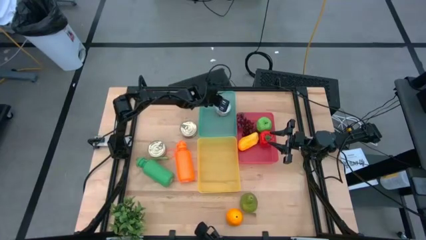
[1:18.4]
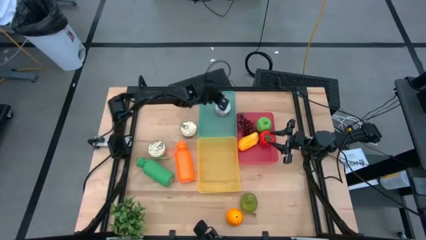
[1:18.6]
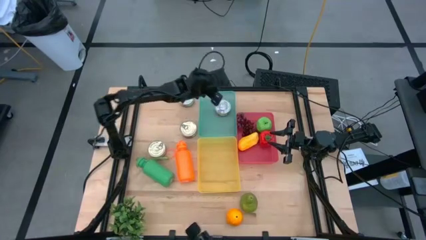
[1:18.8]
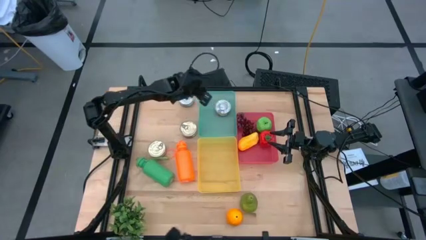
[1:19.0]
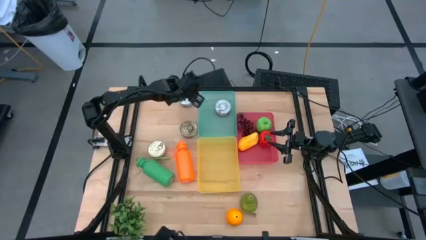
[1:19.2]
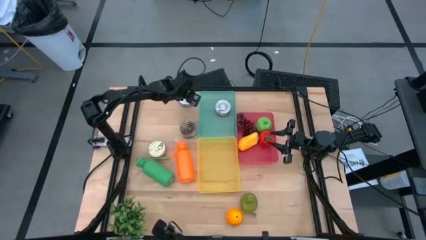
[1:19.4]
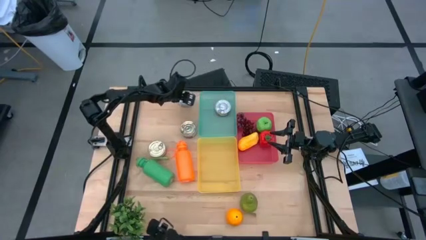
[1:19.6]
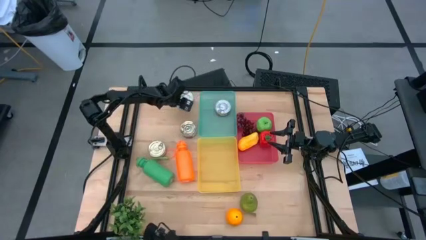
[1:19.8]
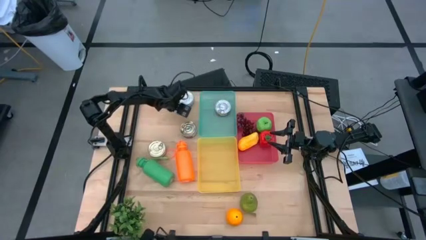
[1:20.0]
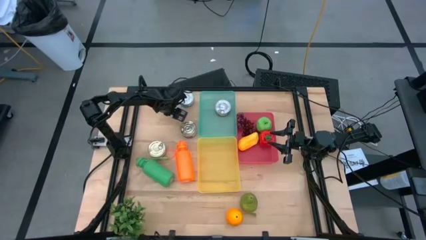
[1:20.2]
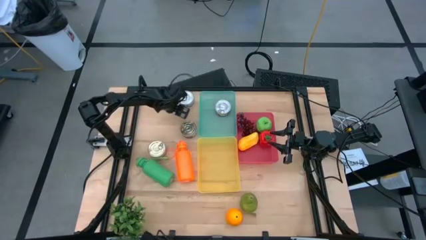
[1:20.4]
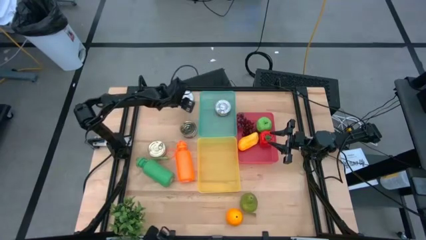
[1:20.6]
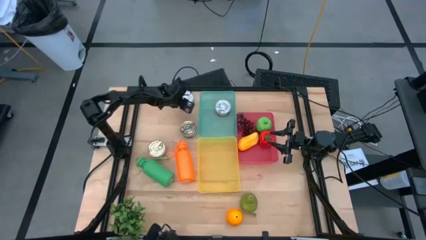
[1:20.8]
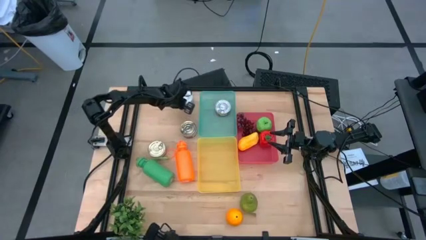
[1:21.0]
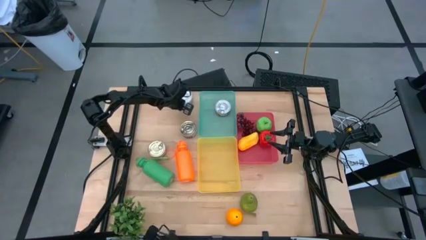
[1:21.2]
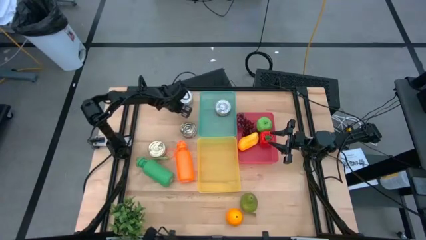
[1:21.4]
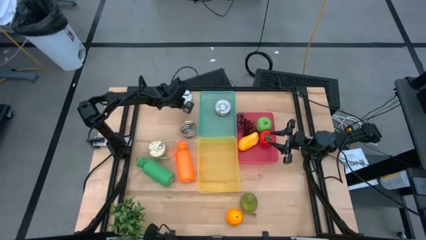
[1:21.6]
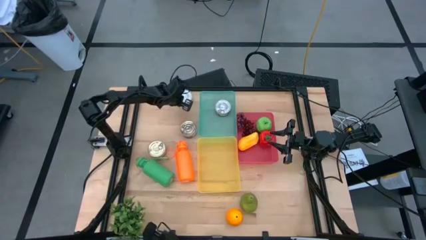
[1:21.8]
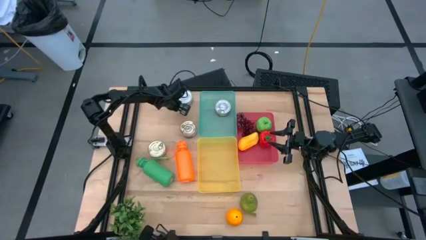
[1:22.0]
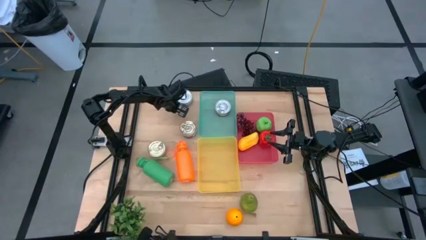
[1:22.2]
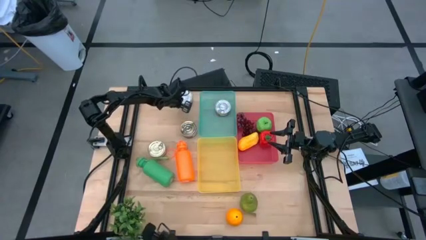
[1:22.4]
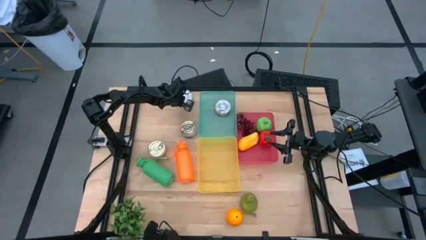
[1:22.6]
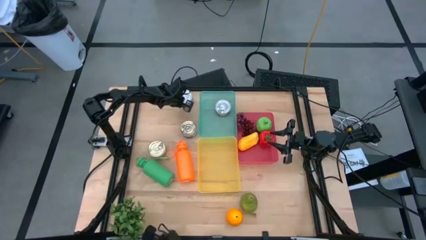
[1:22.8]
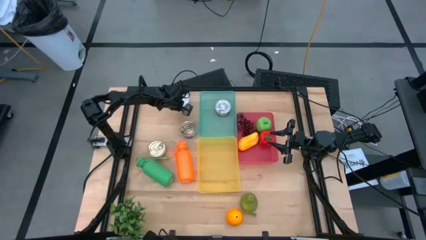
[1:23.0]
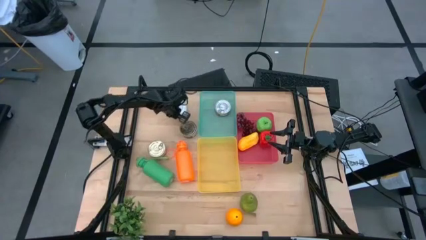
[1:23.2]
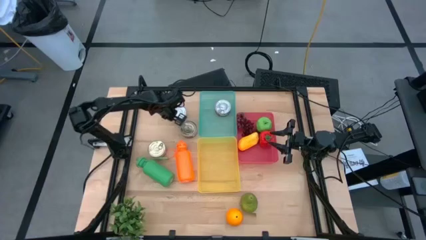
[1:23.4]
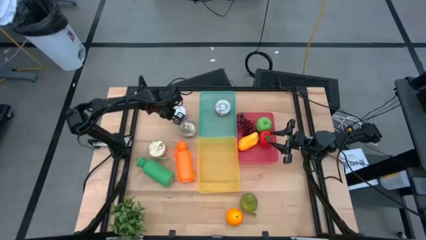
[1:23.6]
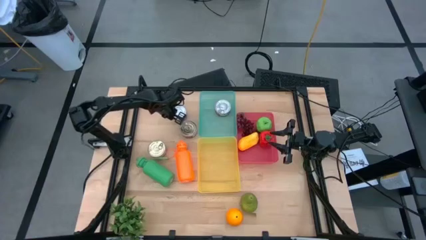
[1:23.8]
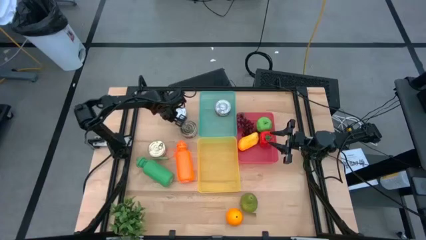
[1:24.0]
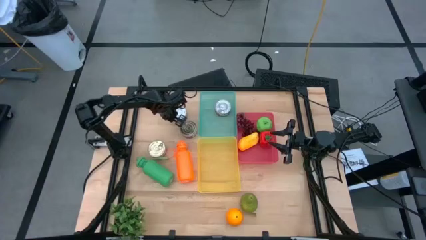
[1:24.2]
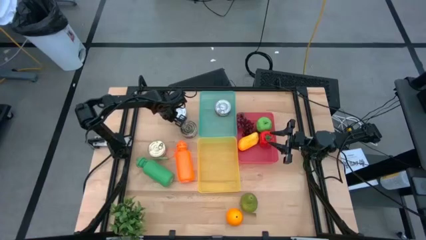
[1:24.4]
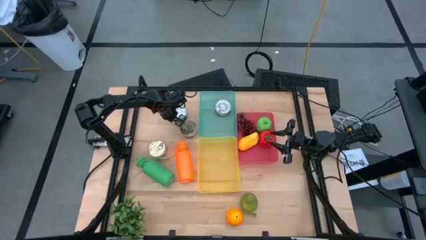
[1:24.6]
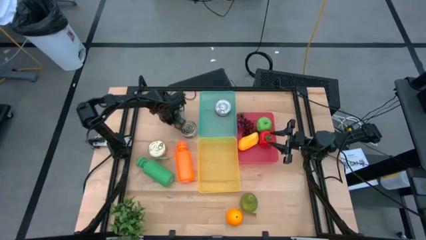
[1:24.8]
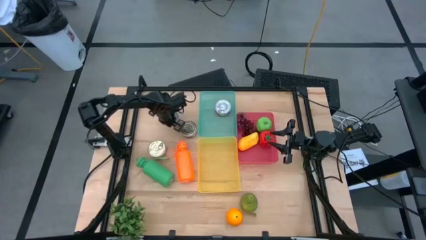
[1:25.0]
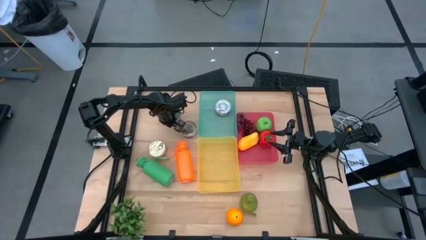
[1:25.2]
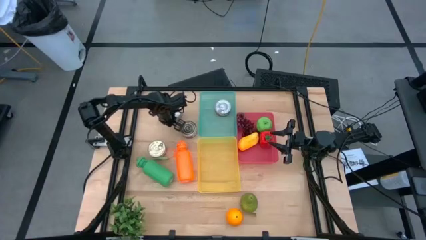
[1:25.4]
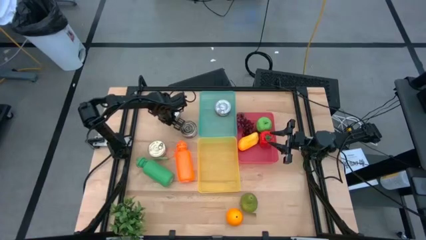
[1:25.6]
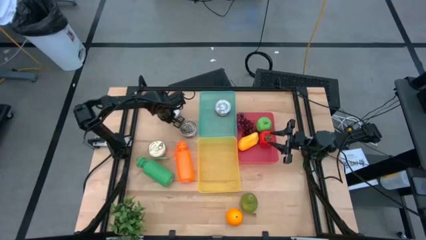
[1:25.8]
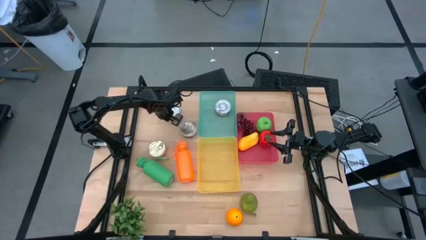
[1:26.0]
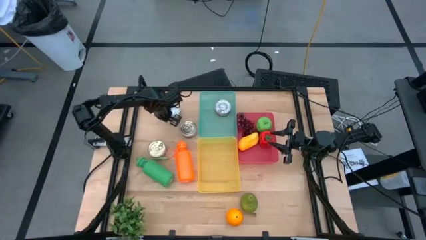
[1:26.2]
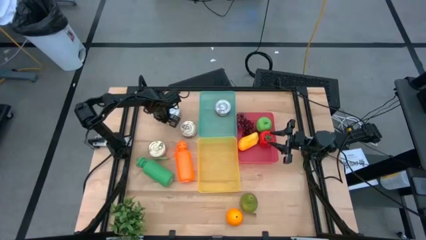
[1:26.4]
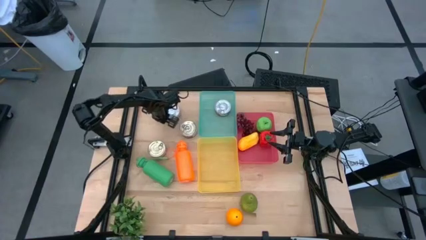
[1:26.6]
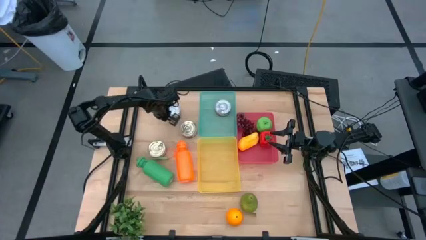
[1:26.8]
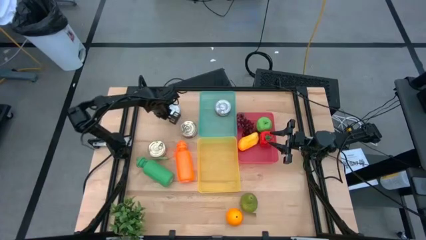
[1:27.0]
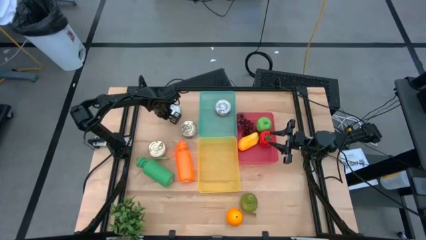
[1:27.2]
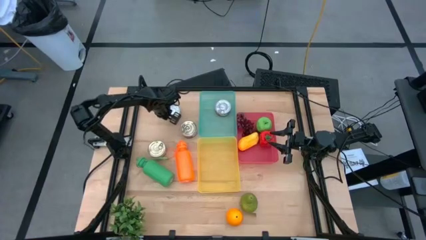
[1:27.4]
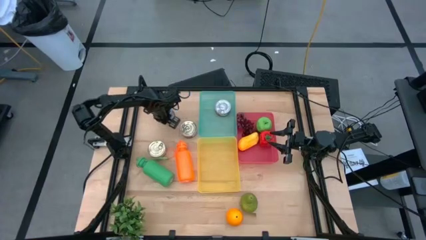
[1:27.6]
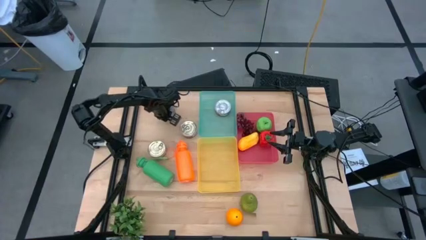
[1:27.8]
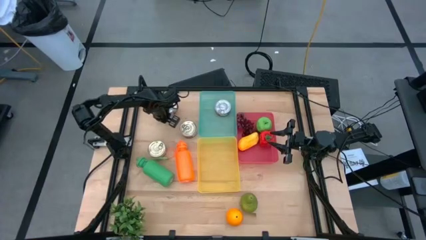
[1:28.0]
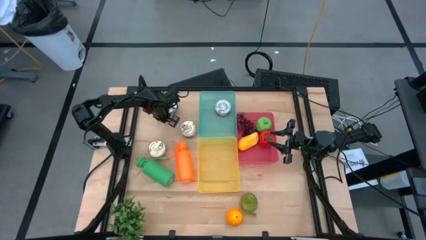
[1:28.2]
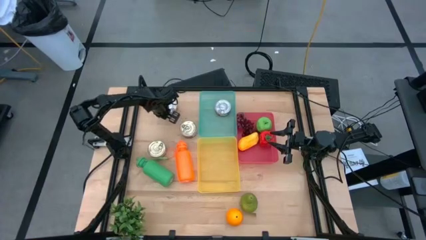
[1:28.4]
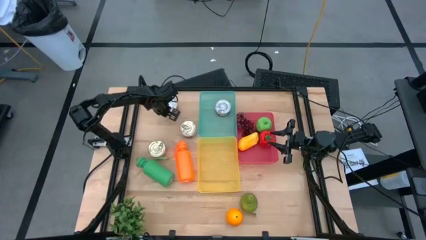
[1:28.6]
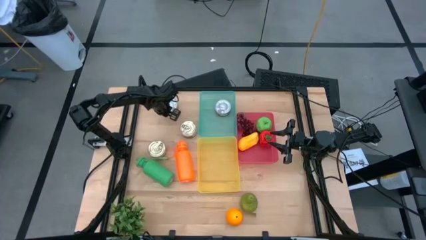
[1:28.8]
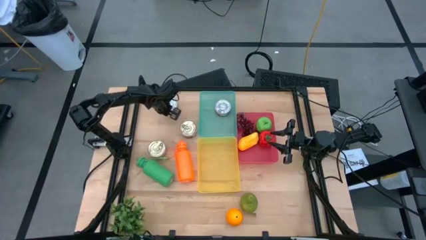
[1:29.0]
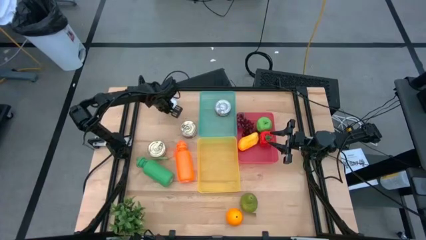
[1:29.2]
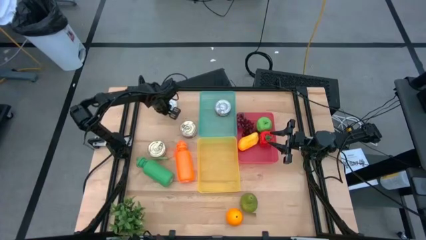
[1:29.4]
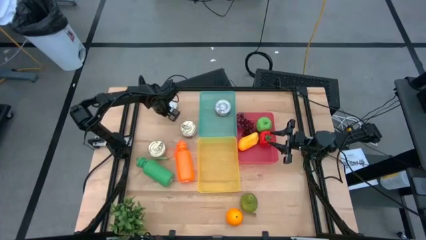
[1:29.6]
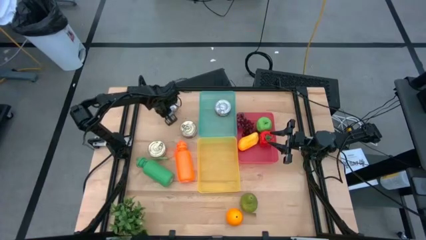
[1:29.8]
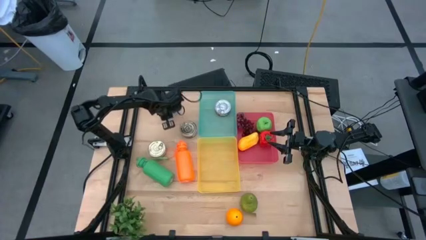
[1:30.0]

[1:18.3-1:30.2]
Task: Pick & Place Food Item
Put the green tuna into the light blue bin

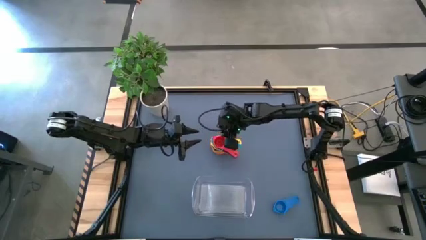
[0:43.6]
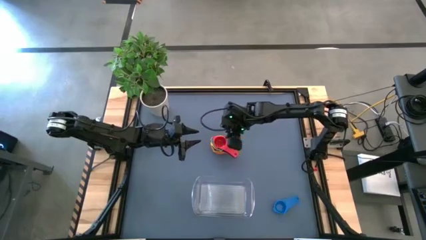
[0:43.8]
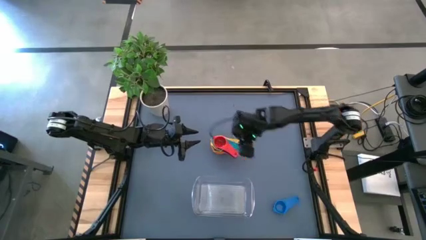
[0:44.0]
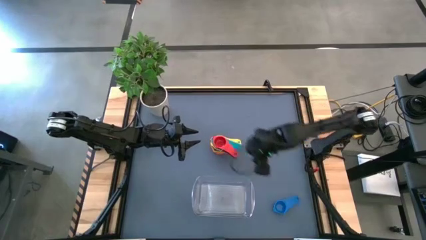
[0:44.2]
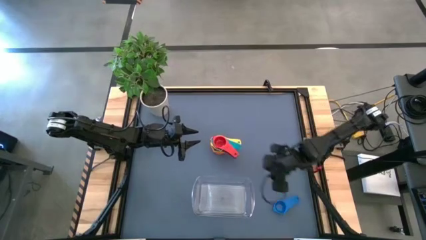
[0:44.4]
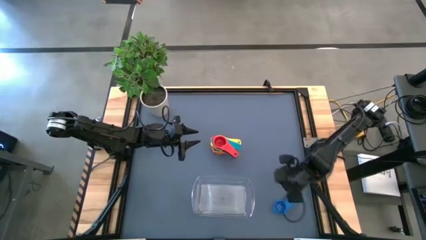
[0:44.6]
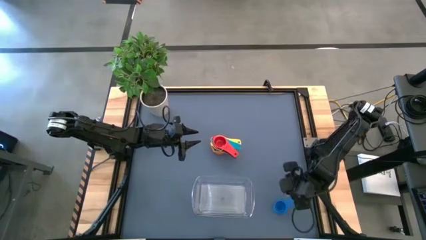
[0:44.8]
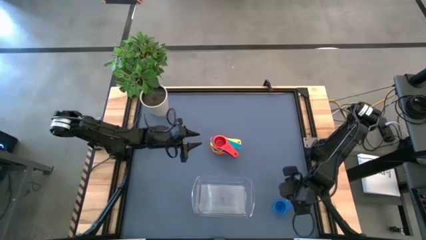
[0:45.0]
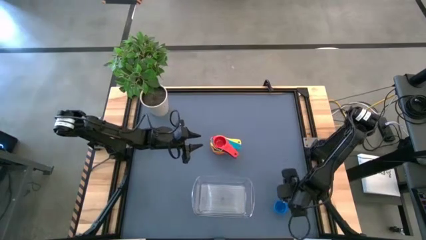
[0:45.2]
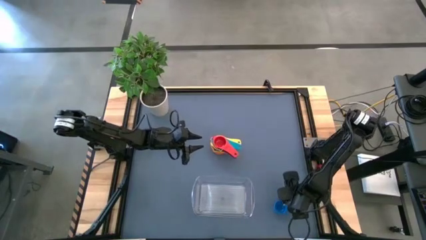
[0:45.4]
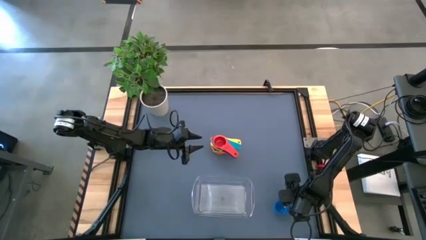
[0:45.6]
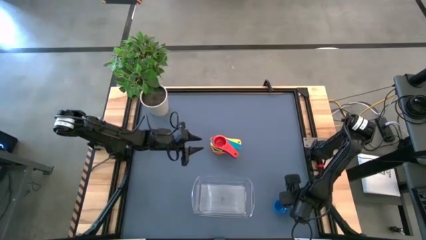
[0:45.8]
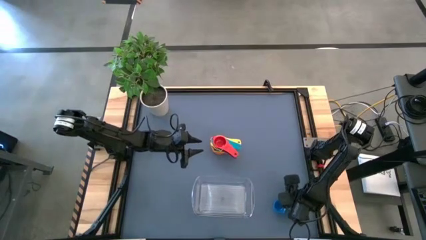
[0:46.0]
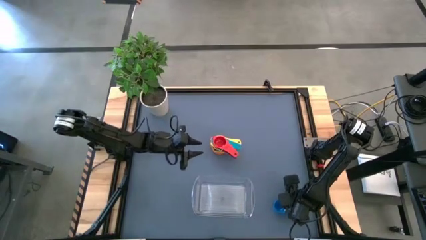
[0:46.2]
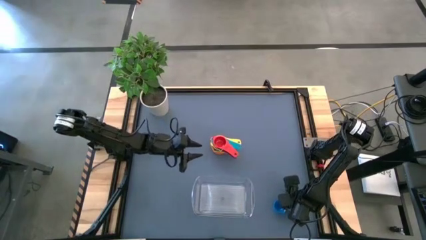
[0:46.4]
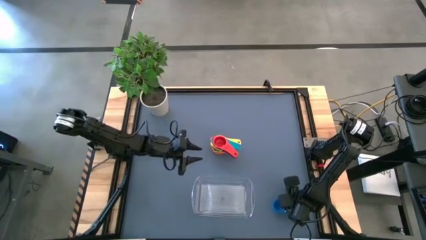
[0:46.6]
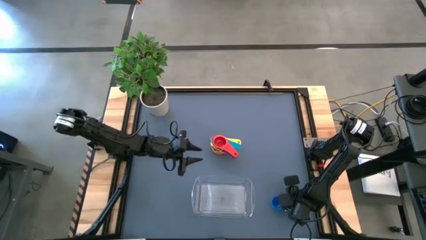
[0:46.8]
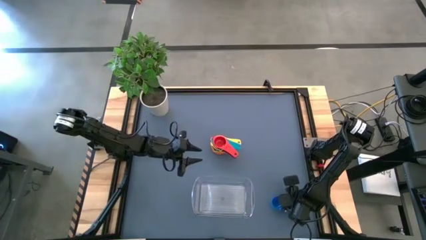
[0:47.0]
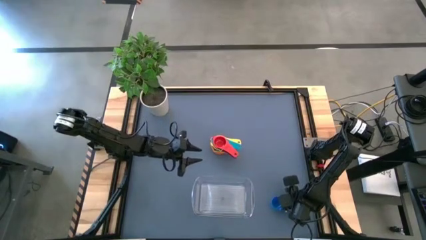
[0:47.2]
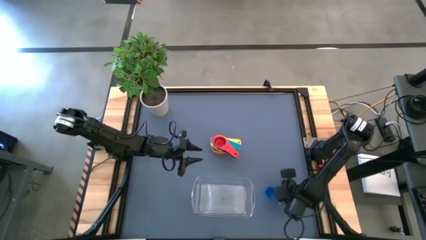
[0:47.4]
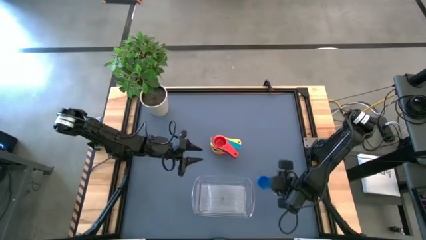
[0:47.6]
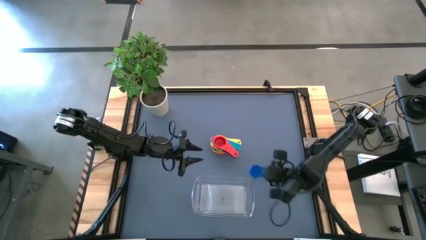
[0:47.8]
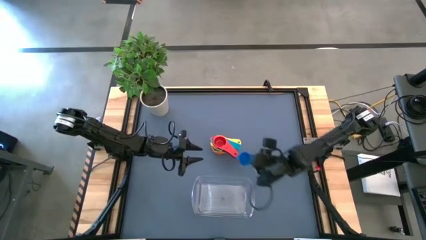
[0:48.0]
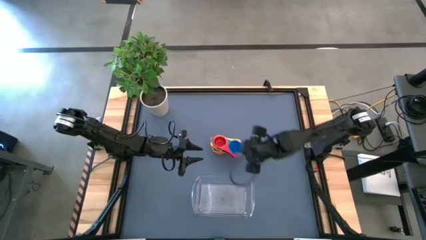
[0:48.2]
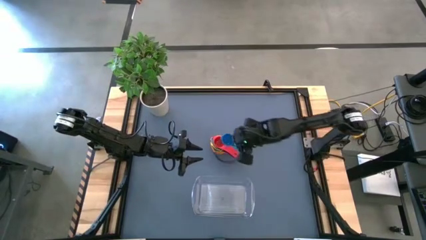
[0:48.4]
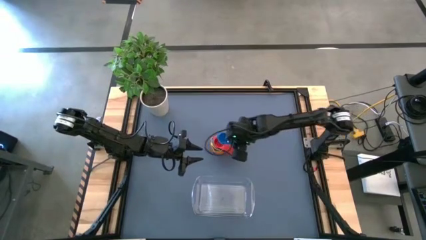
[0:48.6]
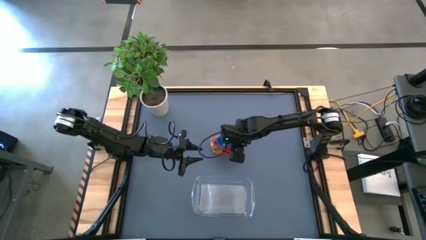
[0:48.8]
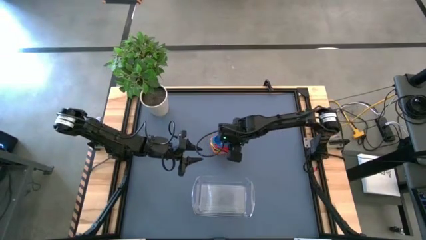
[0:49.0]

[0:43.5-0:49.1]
Task: Nest measuring cups in basket
Stack the dark blue measuring cup on top of the orange measuring cup
